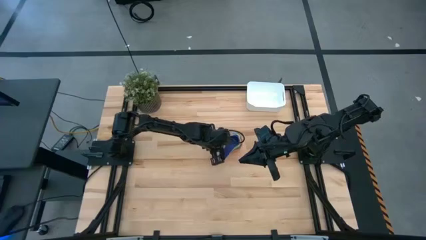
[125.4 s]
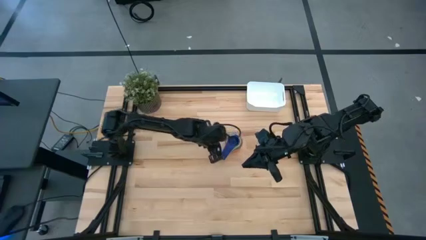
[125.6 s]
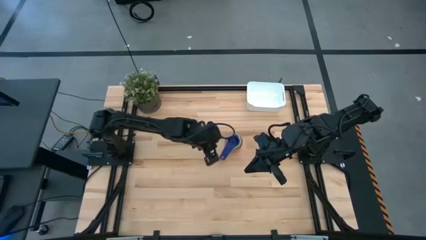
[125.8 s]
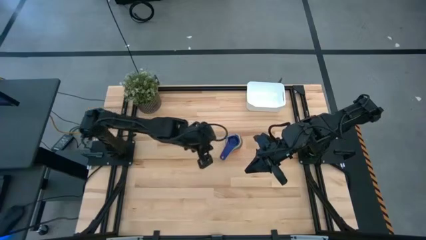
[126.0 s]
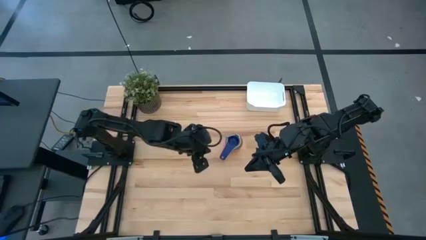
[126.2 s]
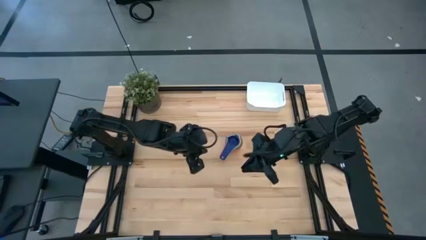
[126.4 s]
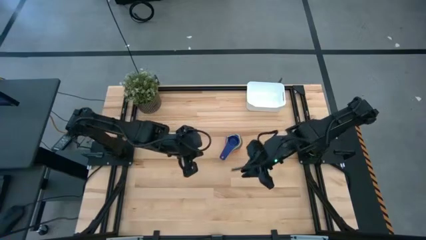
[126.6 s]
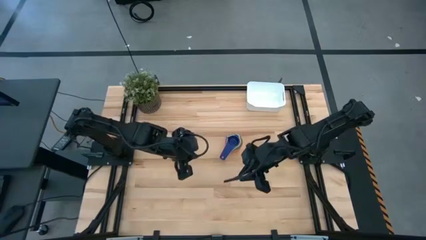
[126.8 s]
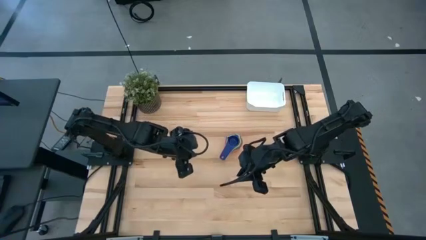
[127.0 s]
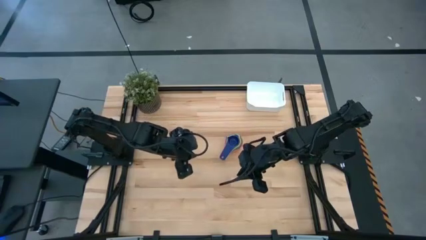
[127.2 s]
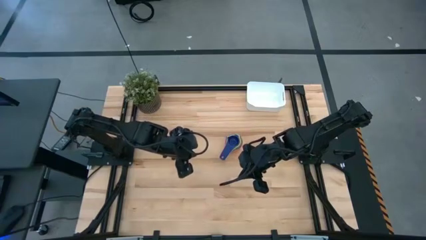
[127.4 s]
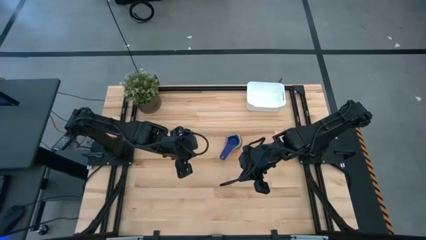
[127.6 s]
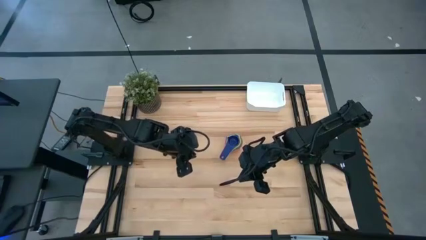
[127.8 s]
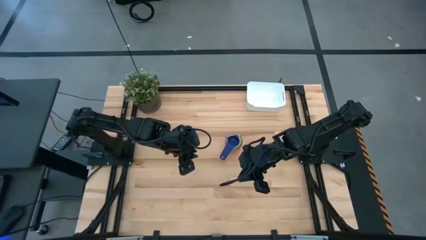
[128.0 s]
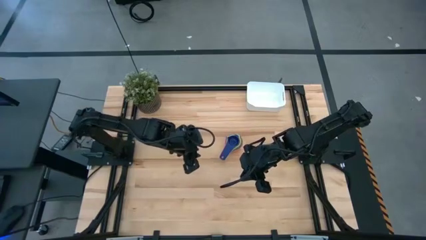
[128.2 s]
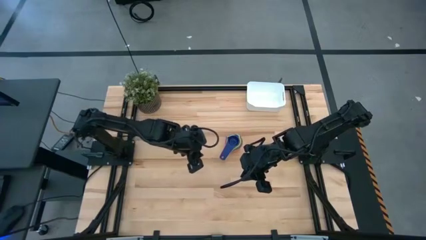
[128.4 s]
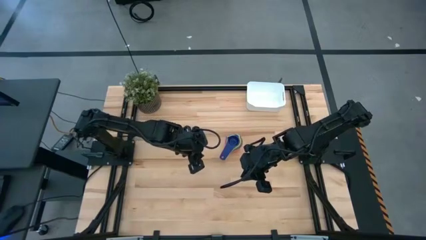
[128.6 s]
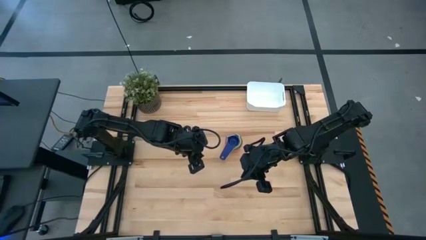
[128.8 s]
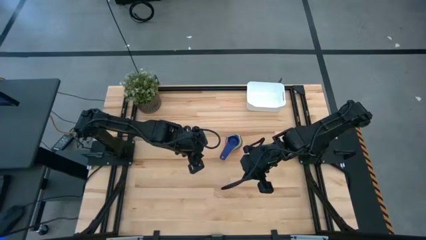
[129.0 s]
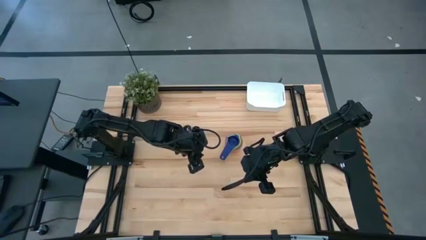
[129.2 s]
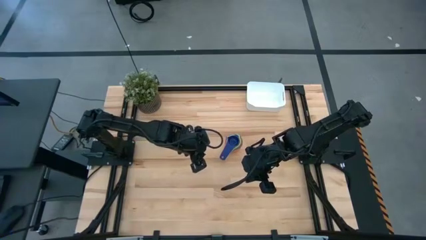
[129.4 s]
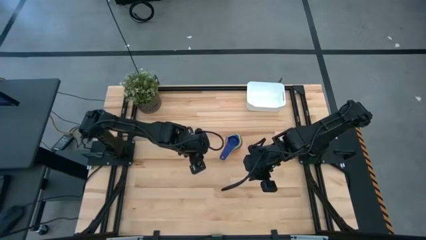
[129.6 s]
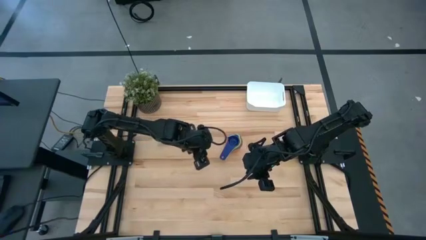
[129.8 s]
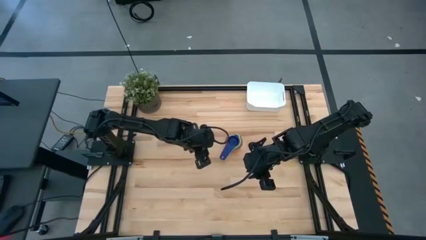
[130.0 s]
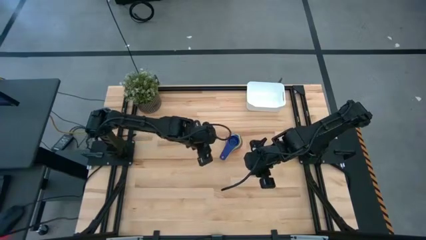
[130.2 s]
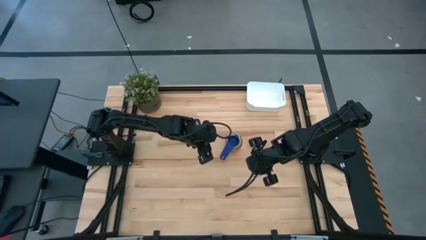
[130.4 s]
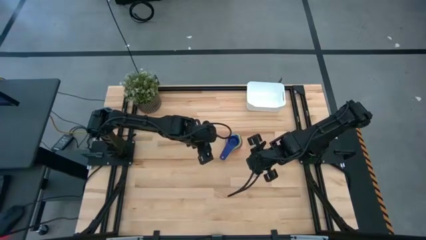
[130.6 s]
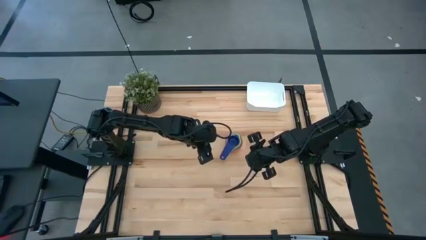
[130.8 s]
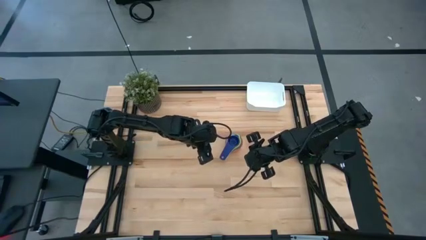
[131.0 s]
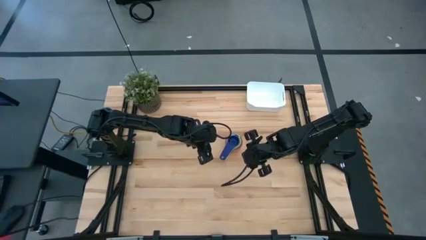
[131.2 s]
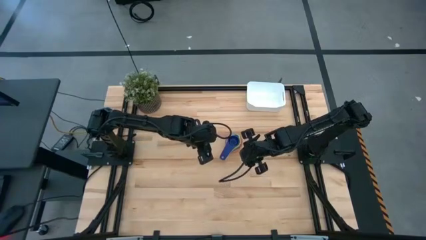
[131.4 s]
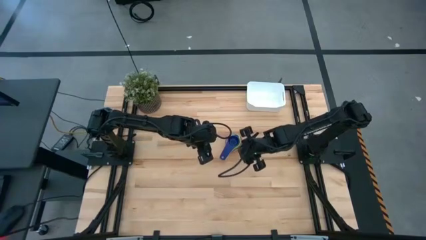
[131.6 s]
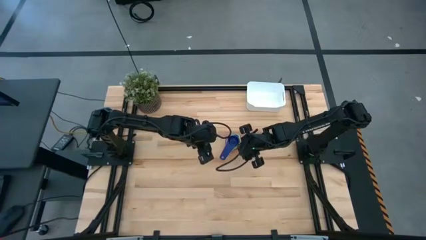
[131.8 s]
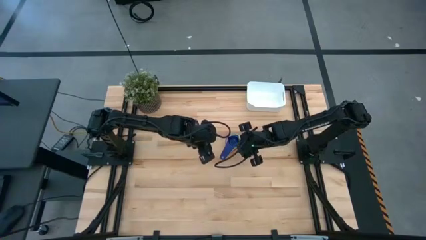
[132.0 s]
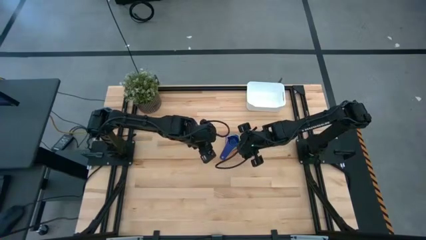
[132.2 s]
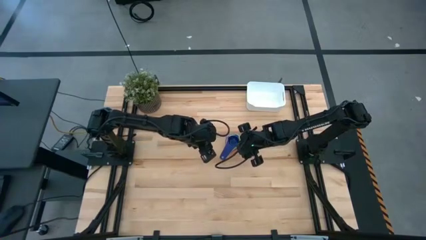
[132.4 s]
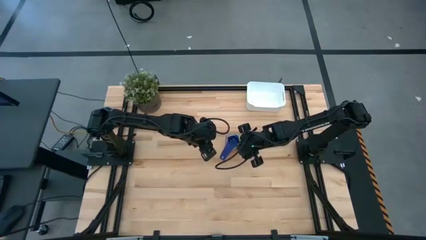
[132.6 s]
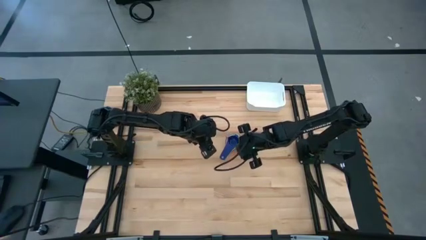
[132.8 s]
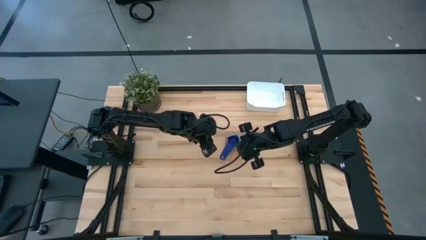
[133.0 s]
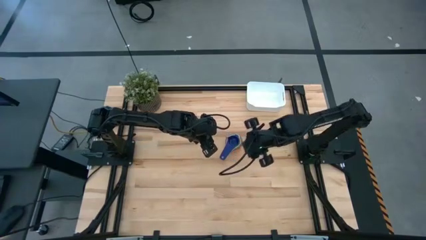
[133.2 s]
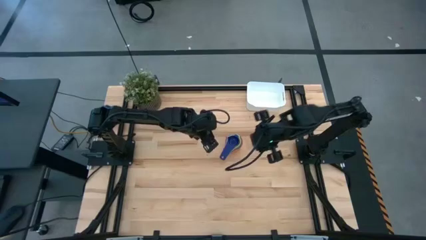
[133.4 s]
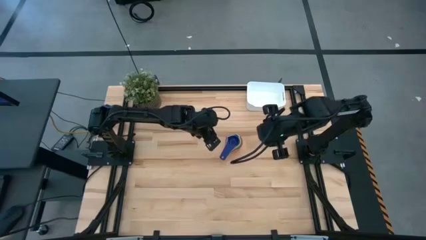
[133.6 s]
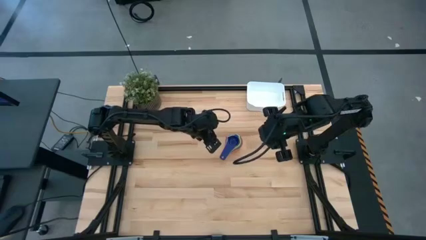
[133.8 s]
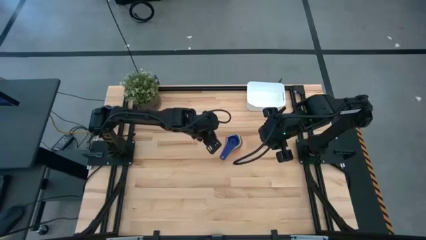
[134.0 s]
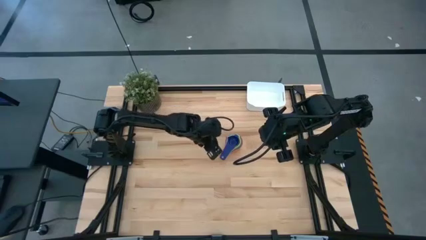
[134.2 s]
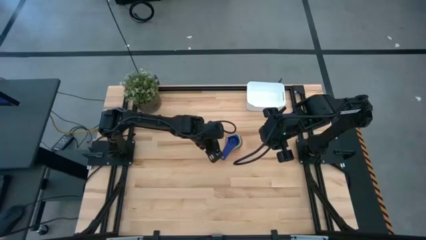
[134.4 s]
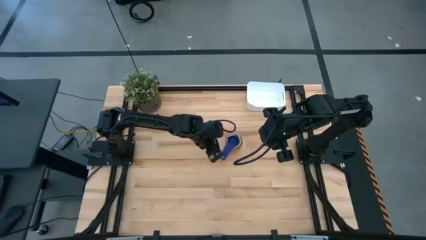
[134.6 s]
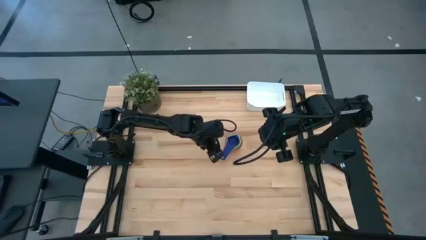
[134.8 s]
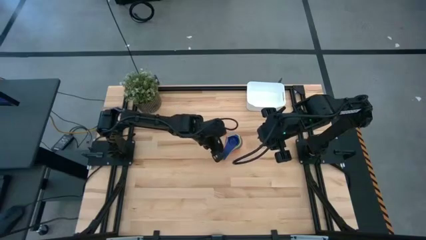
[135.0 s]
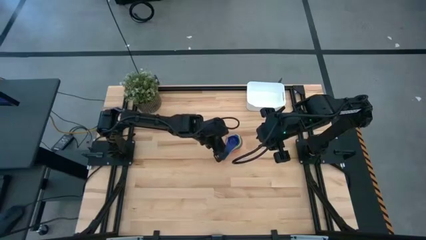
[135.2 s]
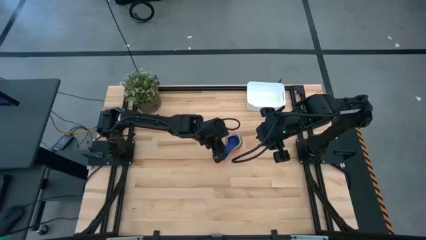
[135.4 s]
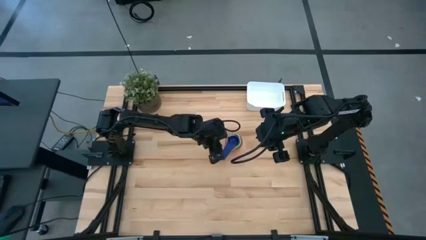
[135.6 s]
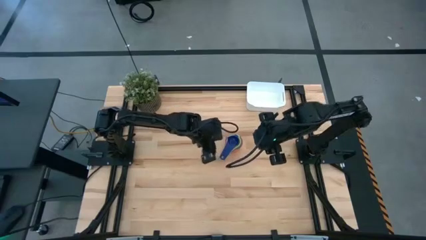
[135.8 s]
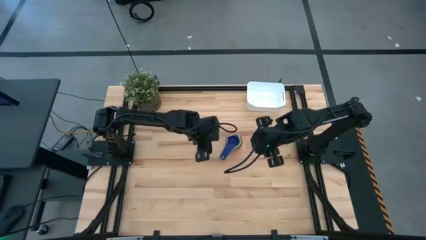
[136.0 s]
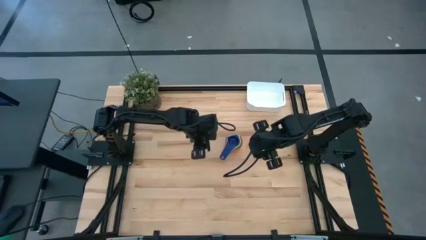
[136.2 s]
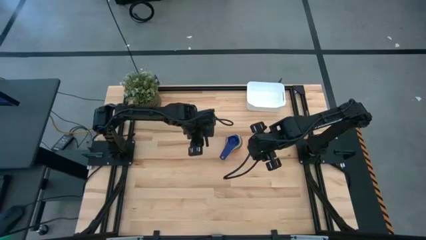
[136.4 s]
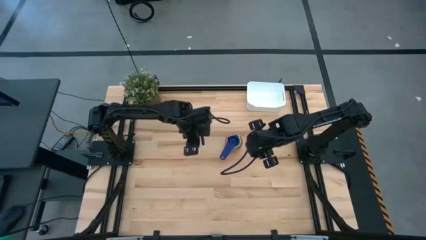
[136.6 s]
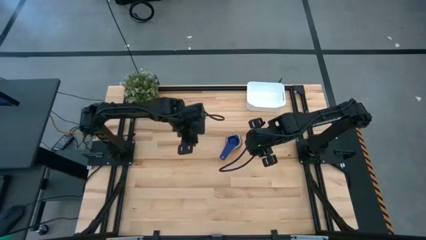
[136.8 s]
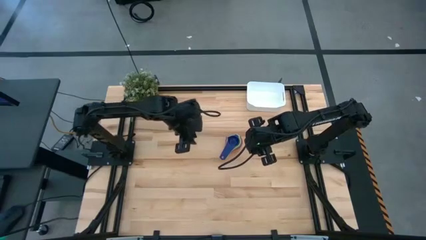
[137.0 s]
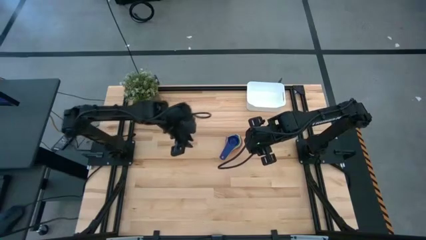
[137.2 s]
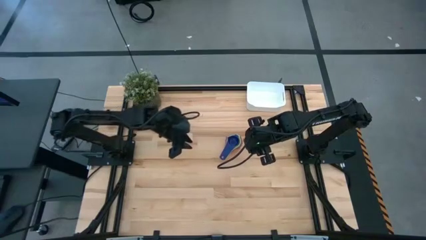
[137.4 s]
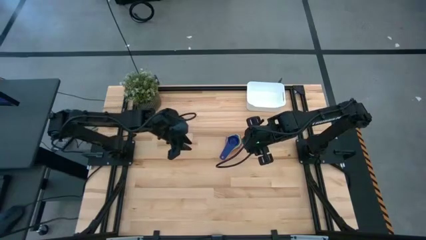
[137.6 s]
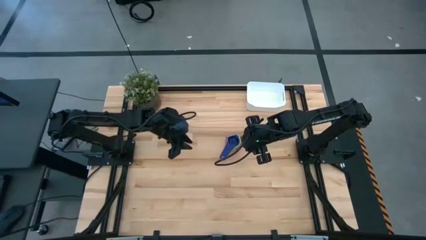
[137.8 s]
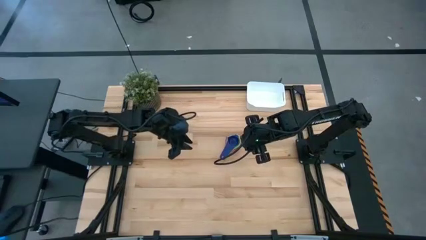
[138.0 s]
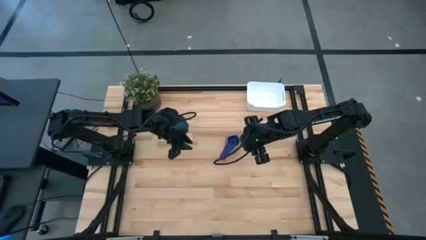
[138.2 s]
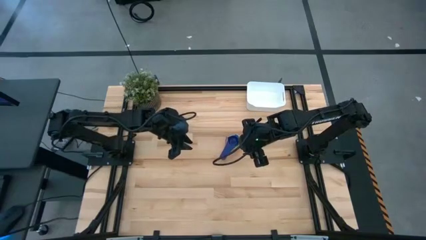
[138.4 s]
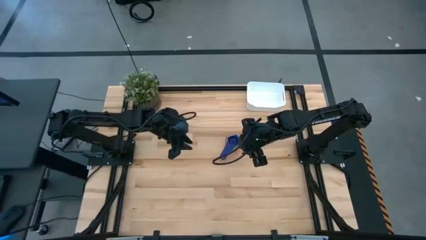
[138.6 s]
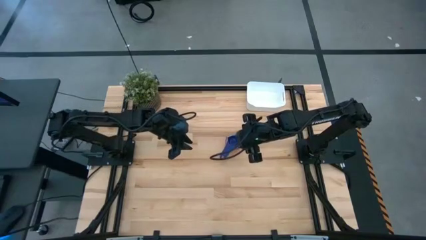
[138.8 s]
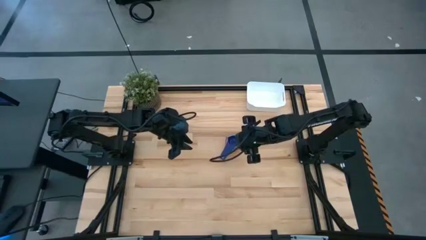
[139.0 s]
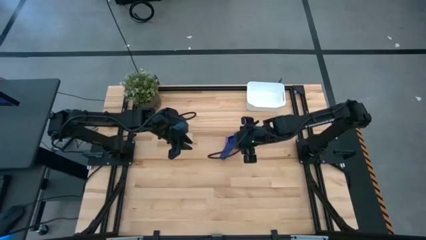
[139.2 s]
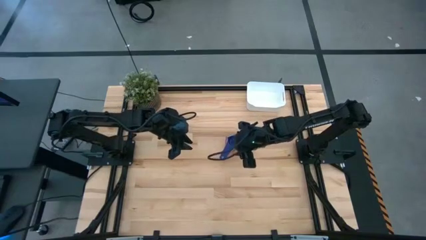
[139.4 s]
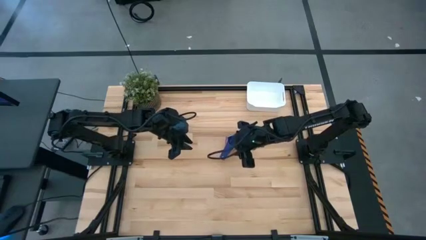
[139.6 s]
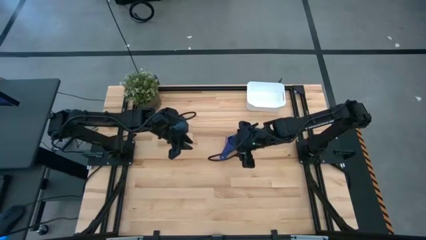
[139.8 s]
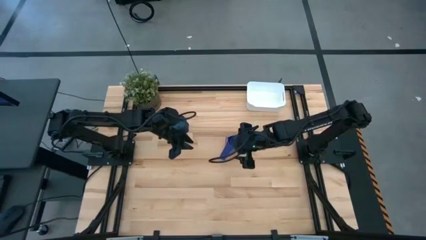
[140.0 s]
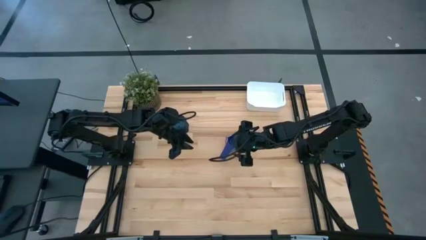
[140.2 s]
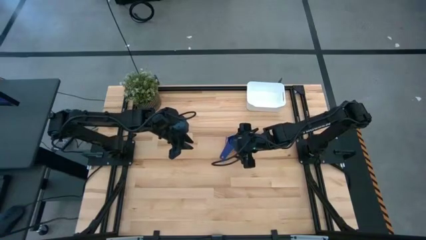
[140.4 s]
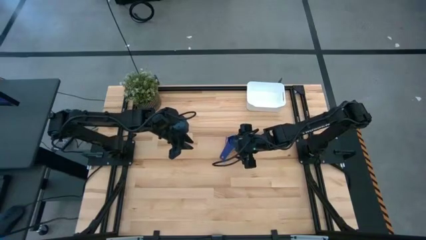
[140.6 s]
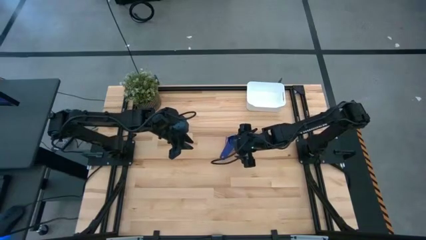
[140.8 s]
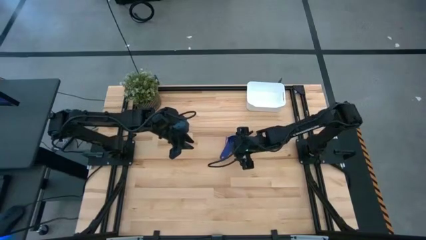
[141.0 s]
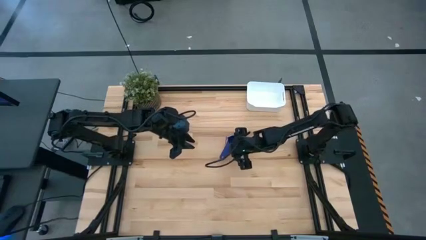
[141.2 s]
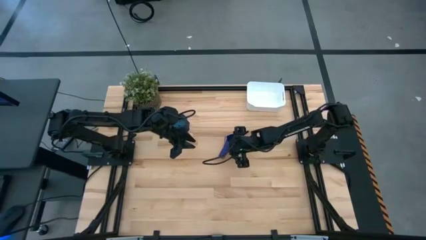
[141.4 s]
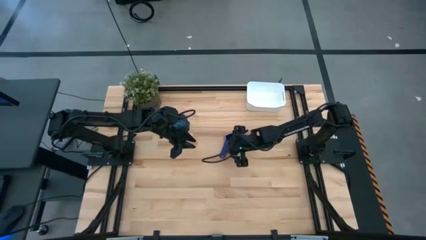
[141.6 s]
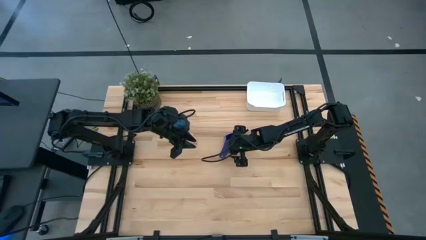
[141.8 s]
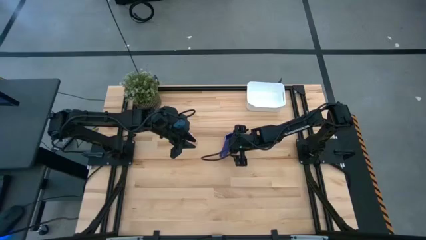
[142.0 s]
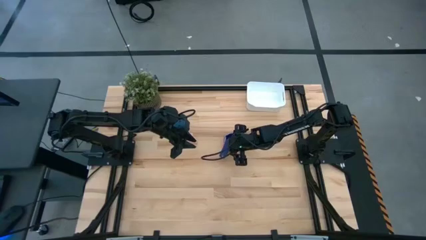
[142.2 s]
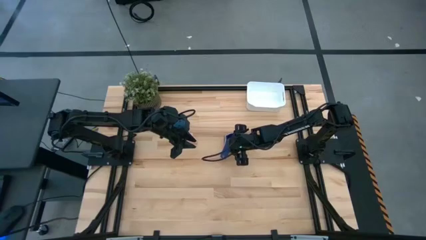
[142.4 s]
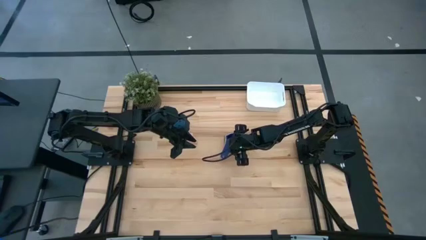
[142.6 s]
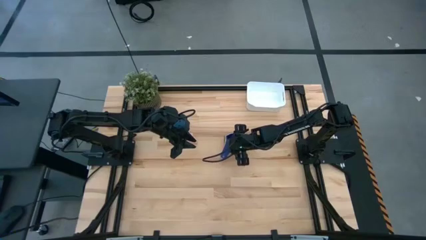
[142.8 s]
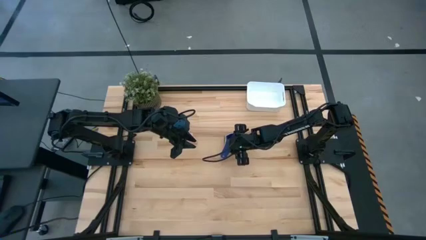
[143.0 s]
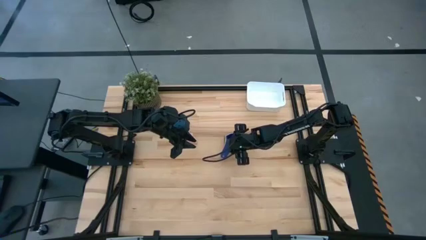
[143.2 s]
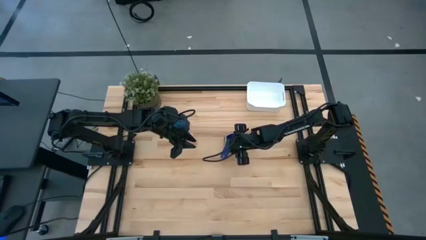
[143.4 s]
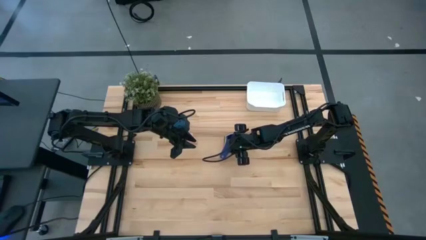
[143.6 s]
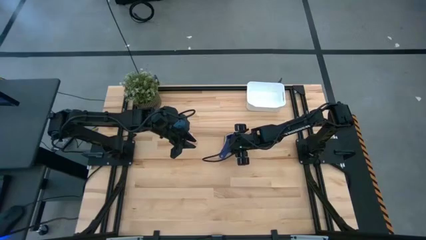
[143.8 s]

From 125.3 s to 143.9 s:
Task: Nest measuring cups in basket
Put the nested measuring cups into the white bin
